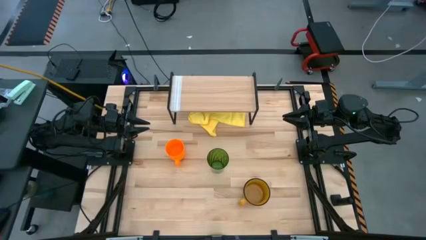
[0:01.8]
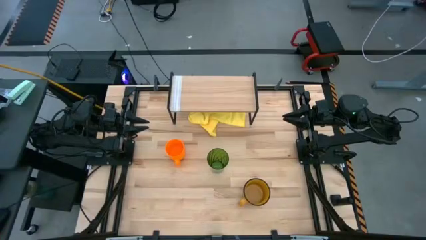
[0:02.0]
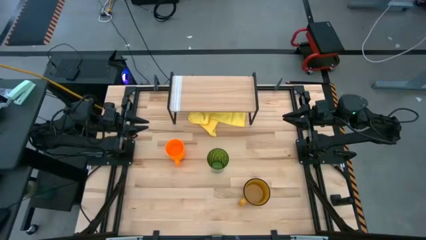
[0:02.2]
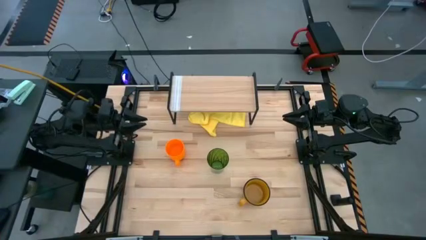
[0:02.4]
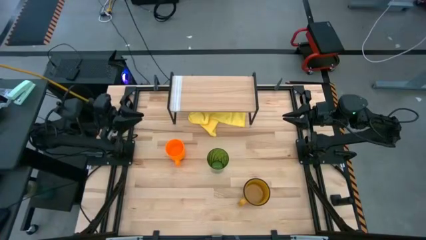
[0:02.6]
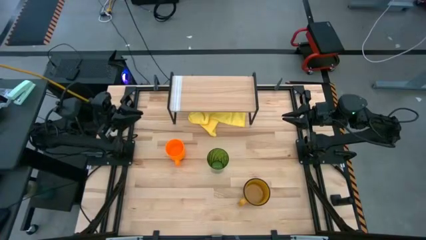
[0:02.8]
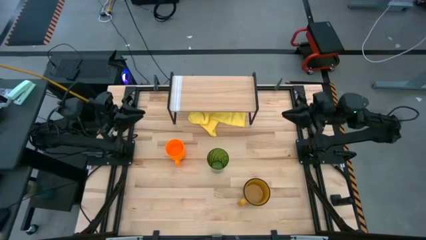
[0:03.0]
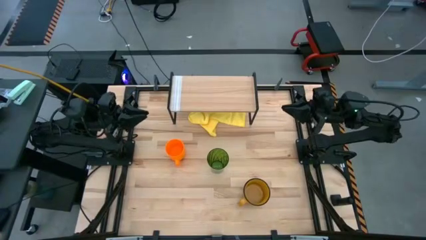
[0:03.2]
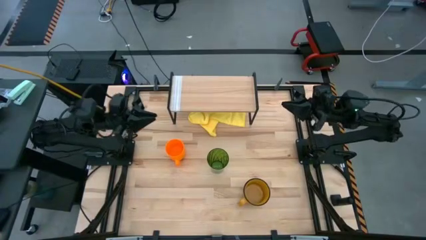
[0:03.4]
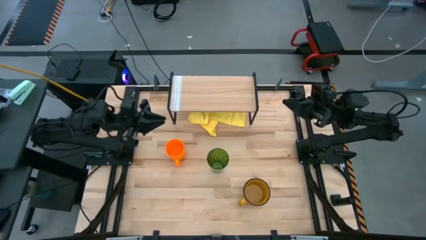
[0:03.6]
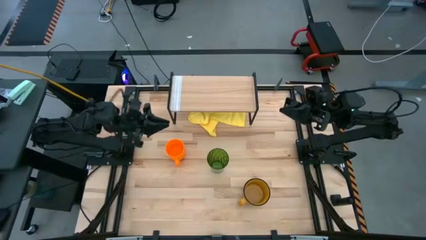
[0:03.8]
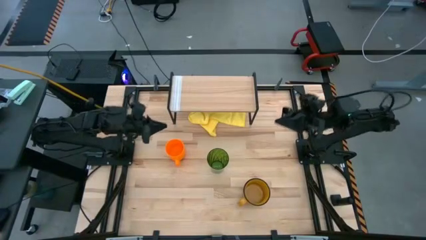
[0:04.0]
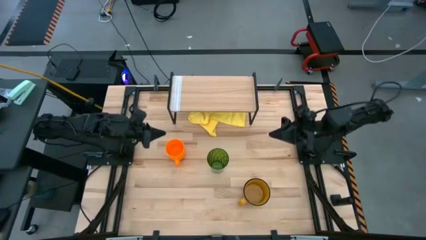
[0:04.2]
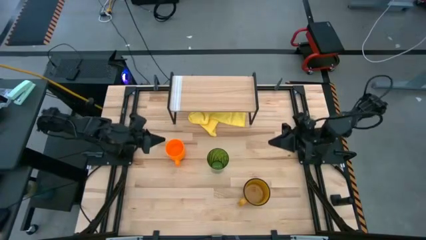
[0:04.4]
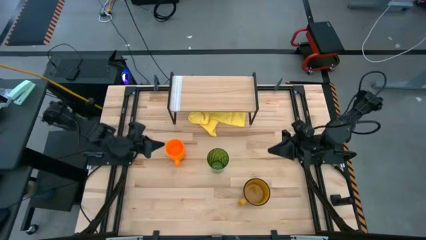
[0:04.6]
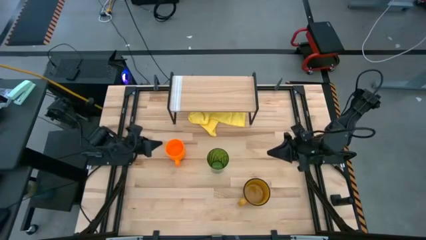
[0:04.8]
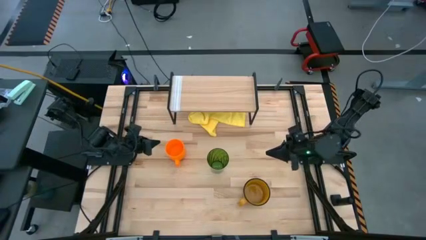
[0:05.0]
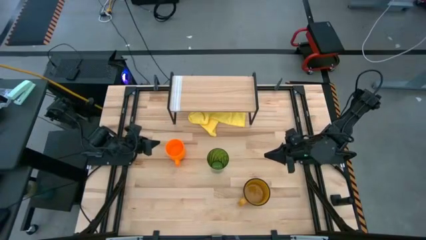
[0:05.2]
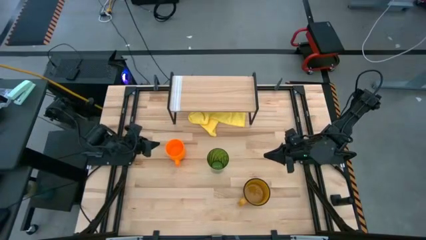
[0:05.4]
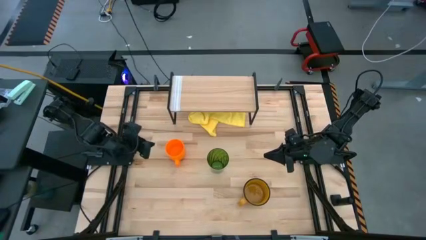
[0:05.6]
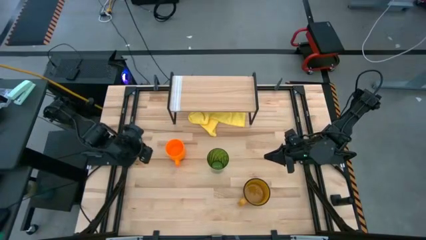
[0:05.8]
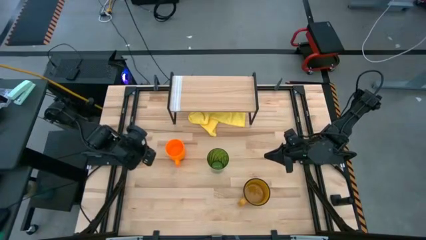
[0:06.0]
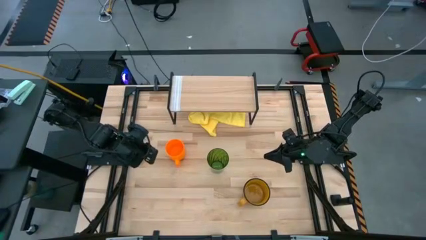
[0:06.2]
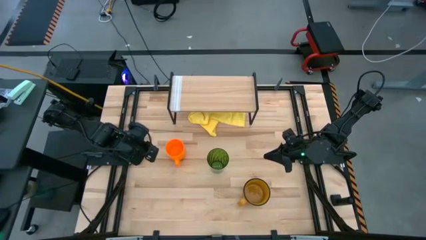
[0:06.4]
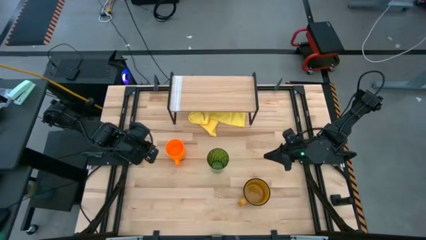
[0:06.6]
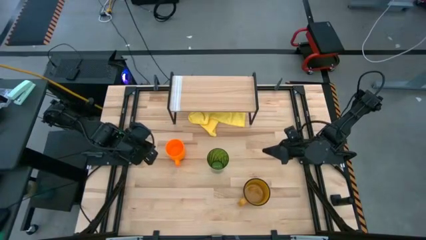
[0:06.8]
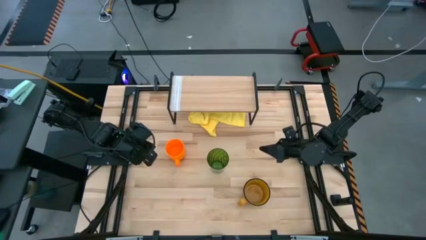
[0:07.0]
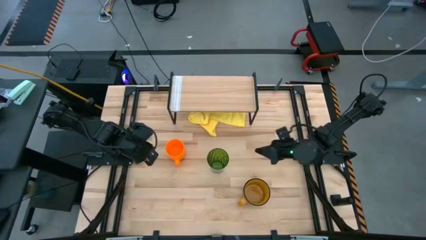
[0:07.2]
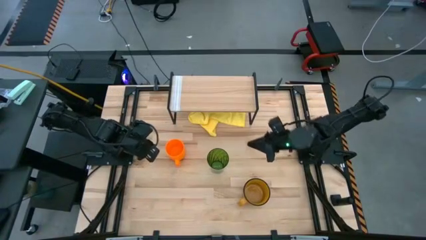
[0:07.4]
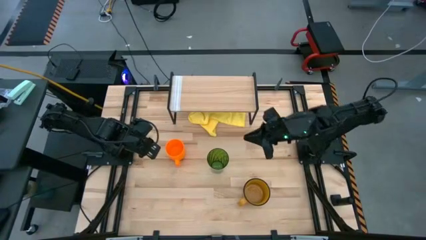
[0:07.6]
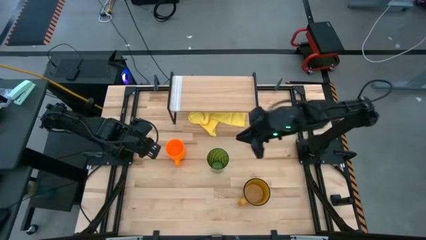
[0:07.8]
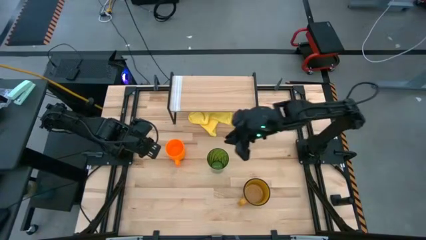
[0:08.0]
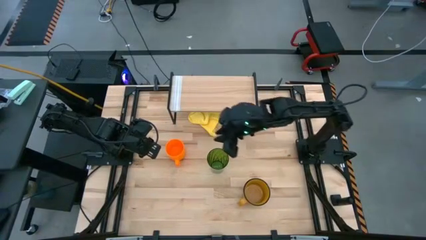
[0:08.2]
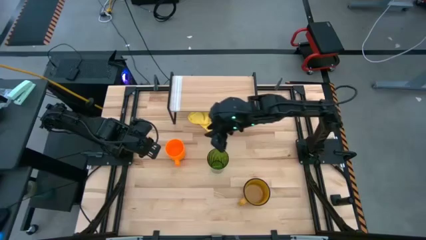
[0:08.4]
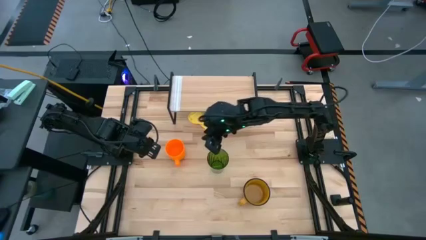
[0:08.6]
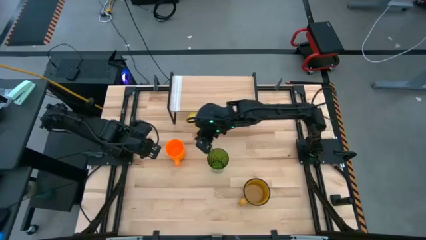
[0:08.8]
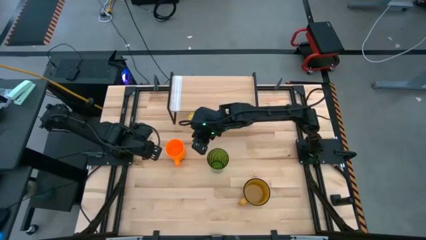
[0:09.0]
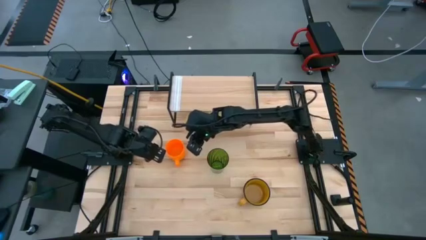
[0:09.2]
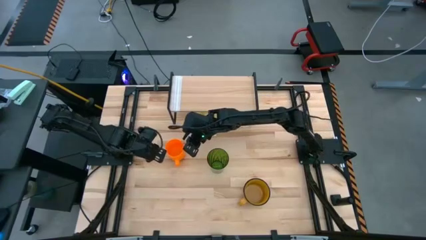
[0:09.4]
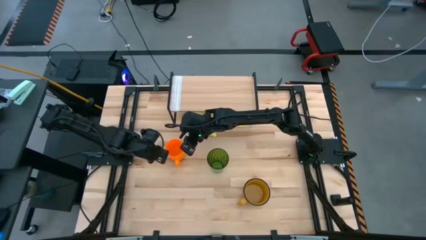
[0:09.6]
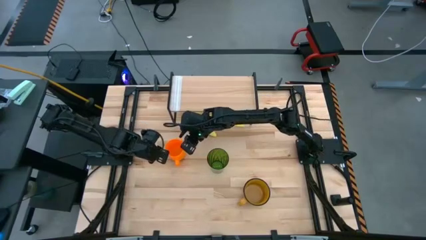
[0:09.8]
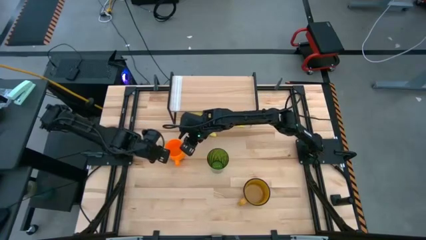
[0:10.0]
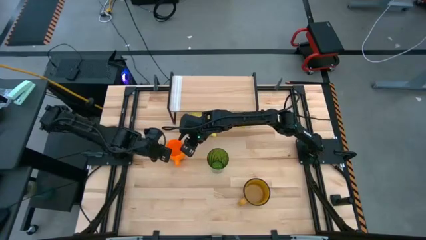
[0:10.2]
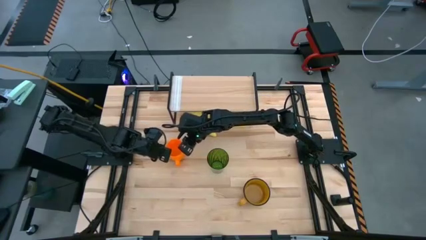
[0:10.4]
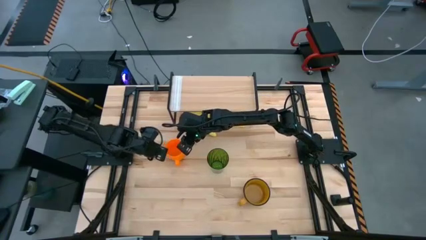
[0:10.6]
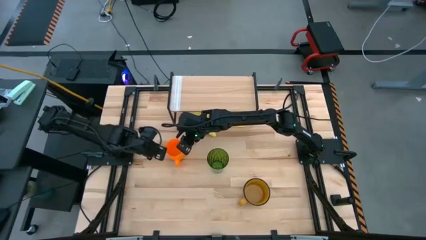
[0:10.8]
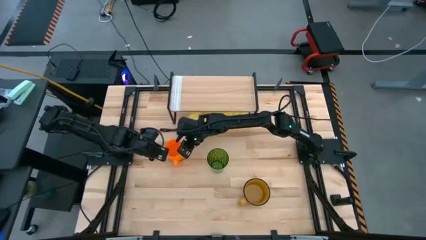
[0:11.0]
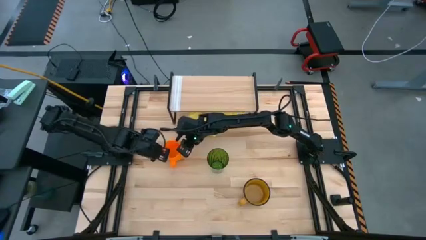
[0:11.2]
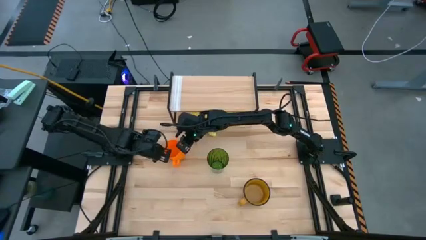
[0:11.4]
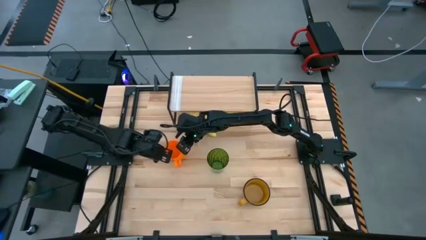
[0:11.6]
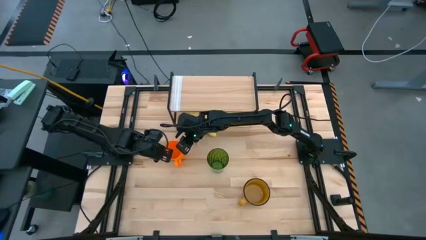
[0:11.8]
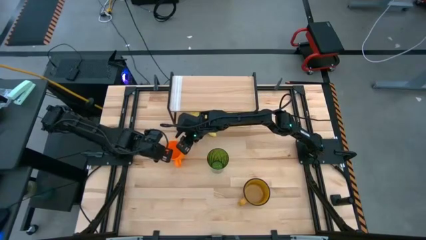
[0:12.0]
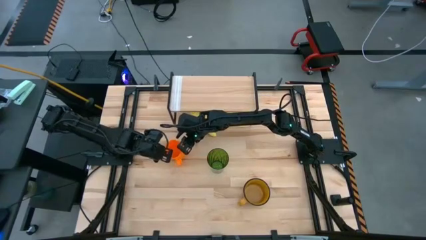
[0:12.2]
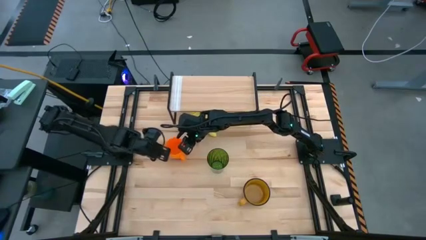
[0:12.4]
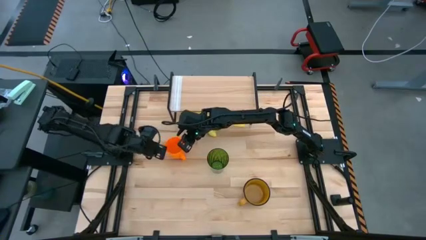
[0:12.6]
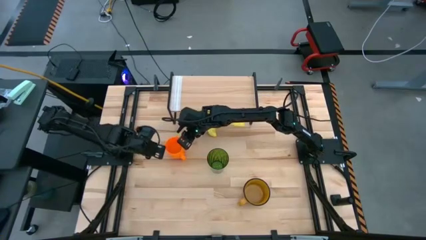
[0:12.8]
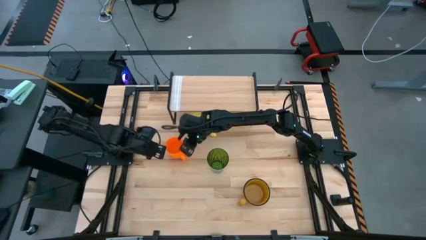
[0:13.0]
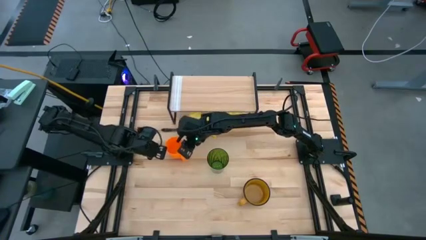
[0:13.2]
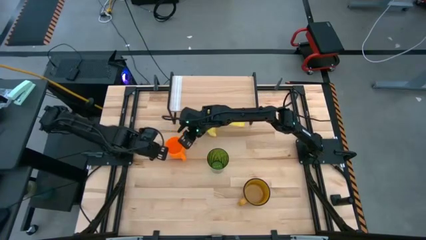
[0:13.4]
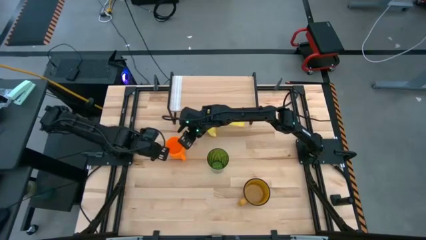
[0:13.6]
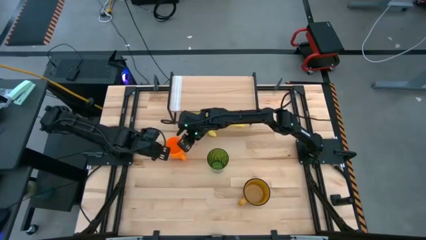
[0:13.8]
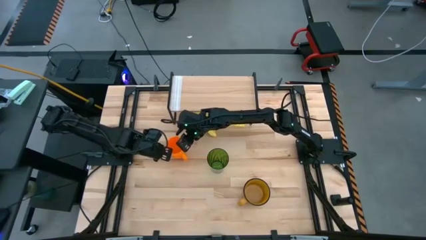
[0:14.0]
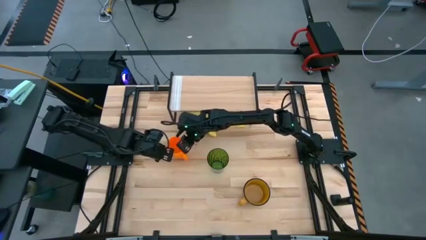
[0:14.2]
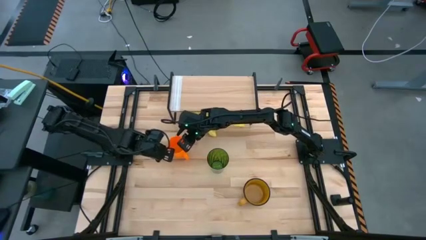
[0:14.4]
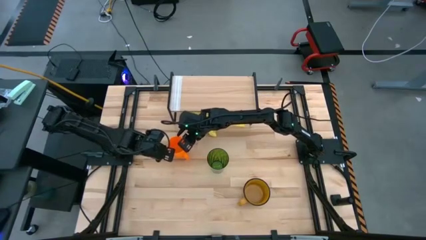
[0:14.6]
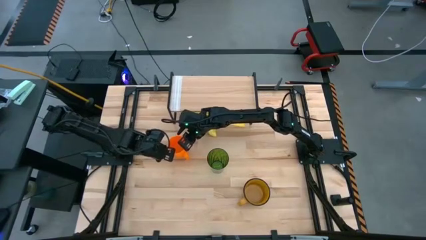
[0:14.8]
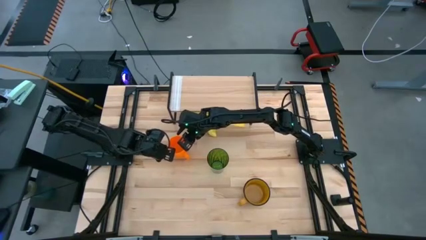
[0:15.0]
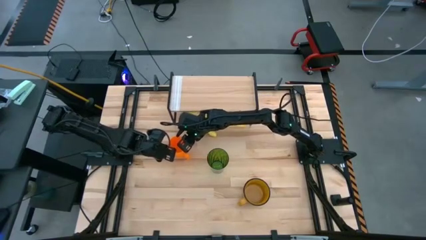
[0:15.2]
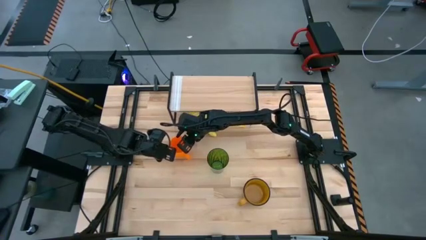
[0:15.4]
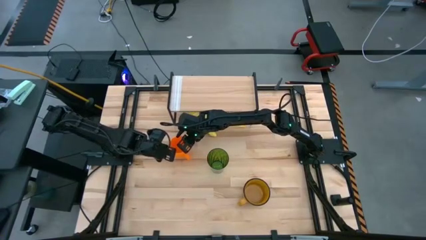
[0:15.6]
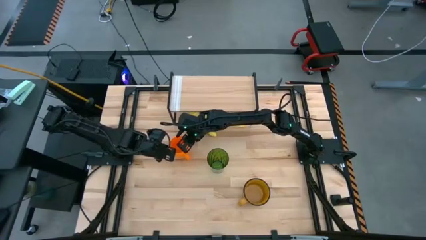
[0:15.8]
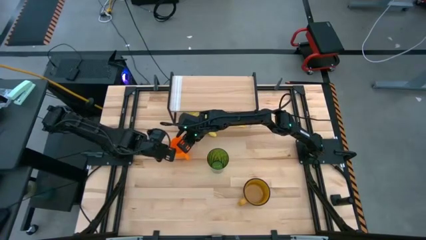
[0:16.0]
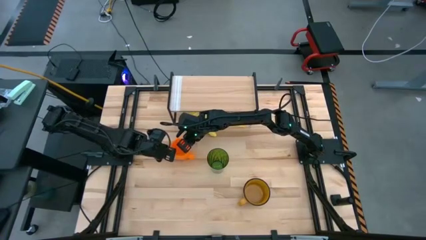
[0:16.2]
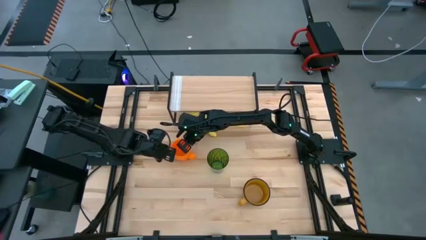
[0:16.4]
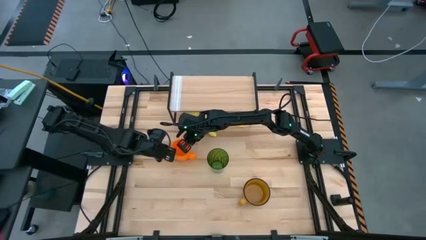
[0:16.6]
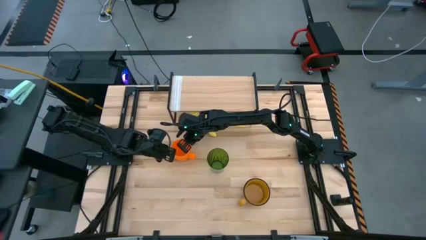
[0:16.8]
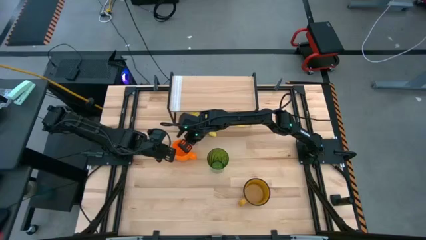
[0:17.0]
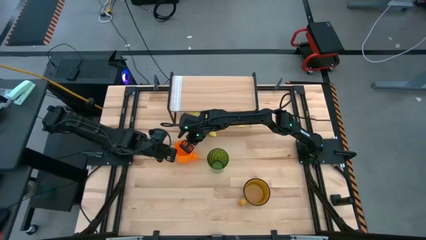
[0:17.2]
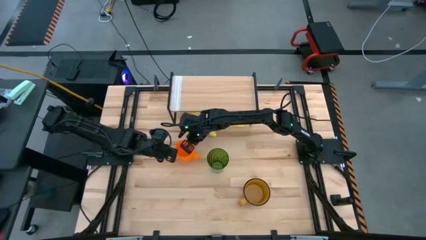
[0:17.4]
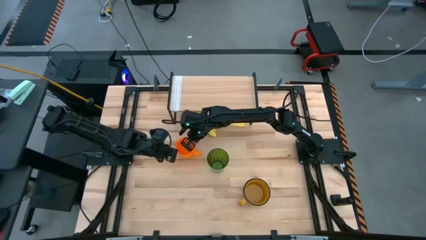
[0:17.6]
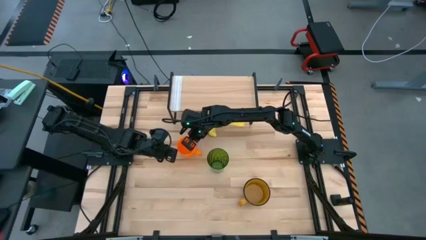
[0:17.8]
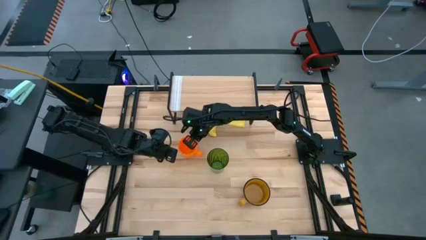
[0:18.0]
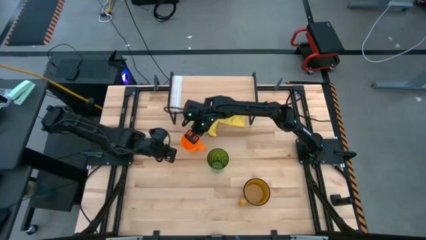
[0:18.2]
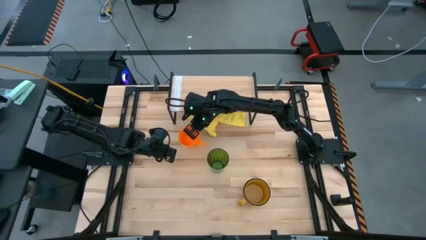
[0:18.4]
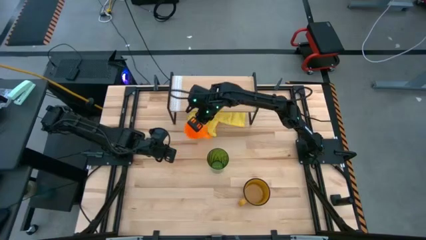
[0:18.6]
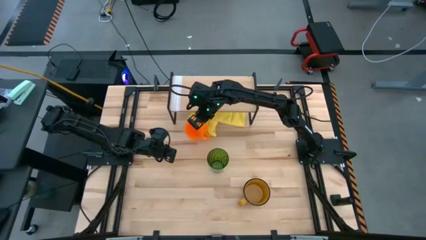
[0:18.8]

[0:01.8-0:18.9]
Task: Stack small to large cups/mugs on shelf
Put the orange mug on the shelf
